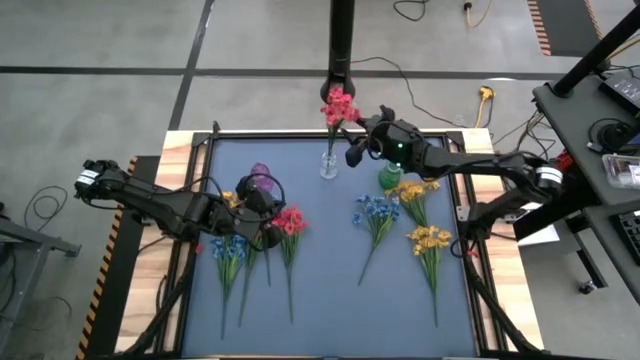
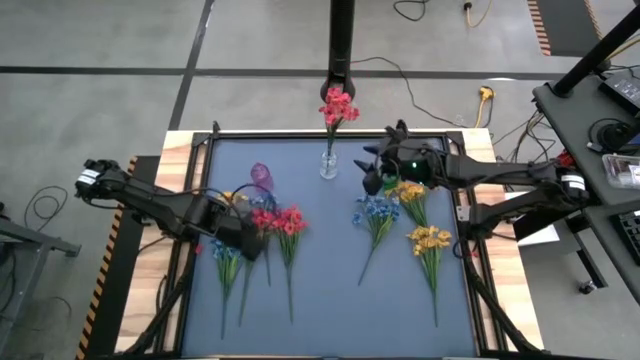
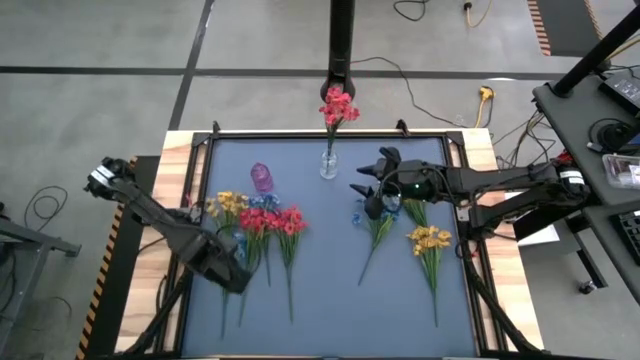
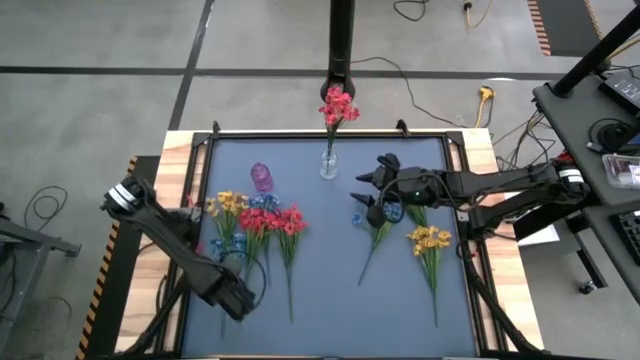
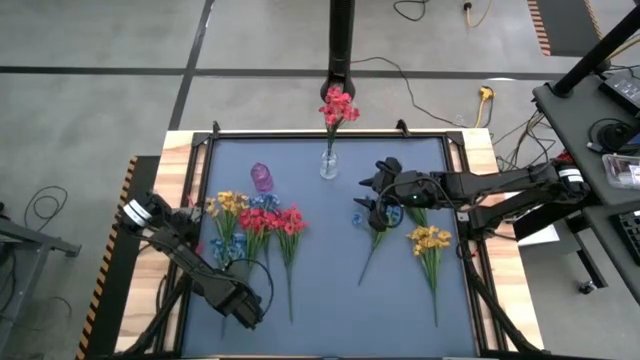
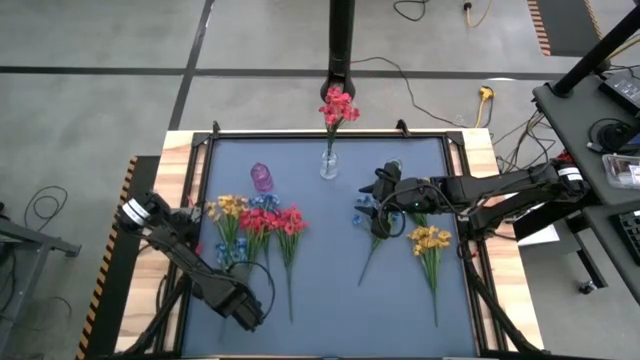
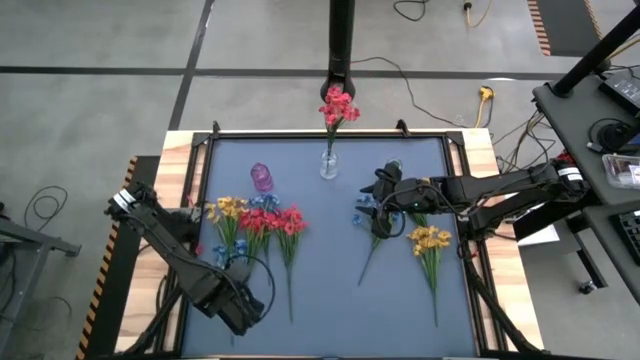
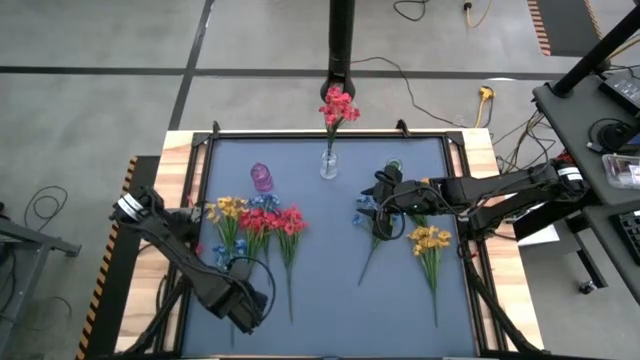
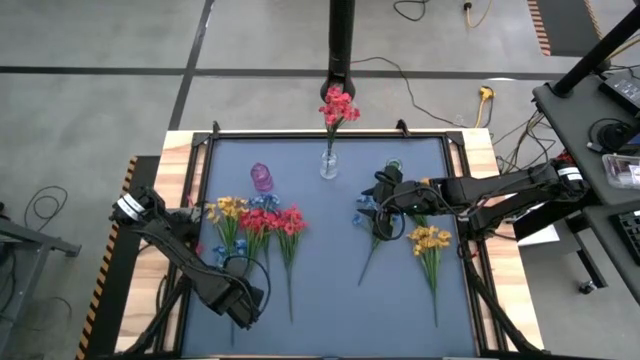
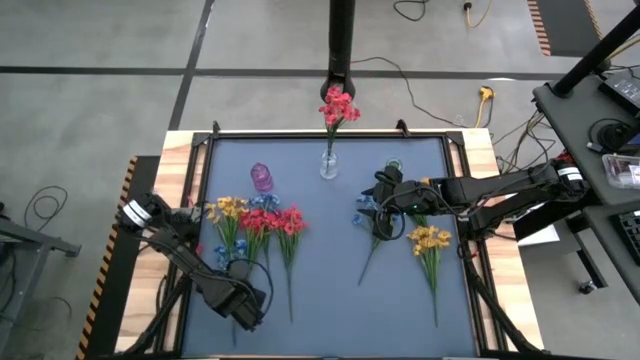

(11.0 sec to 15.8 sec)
Task: Sort flowers into vase by color
Put the left blue flower into the purple vase

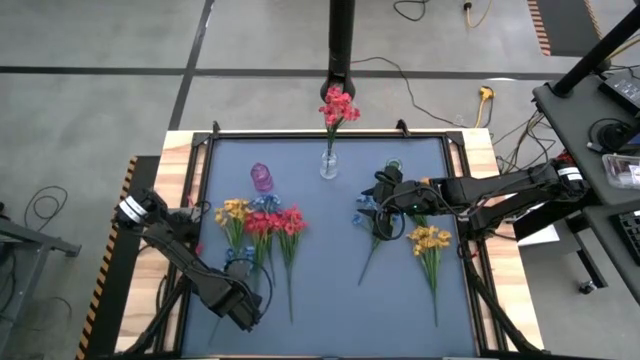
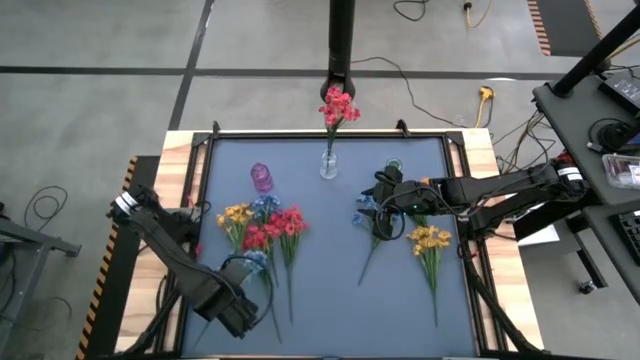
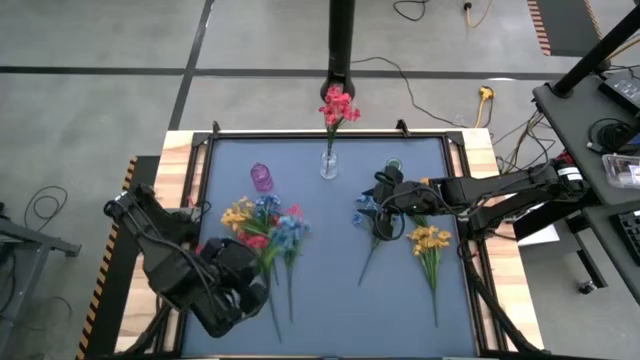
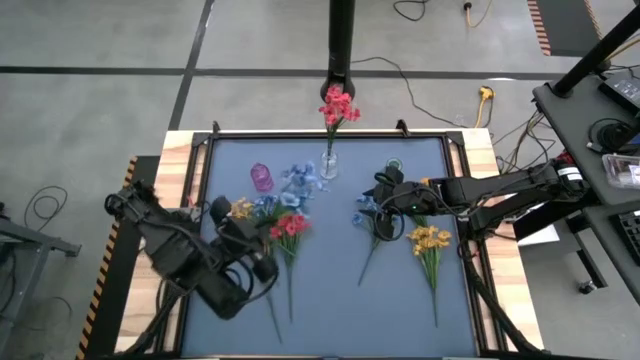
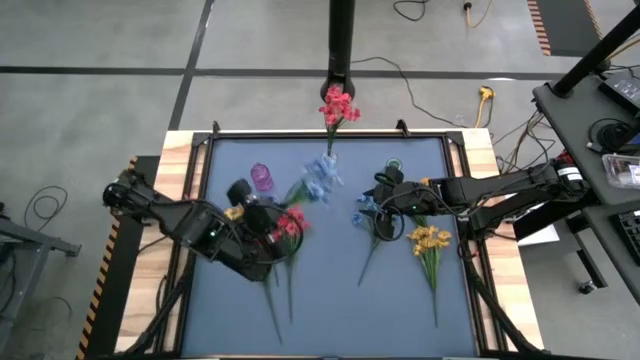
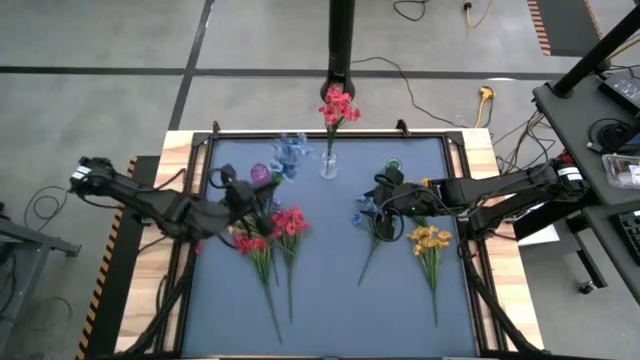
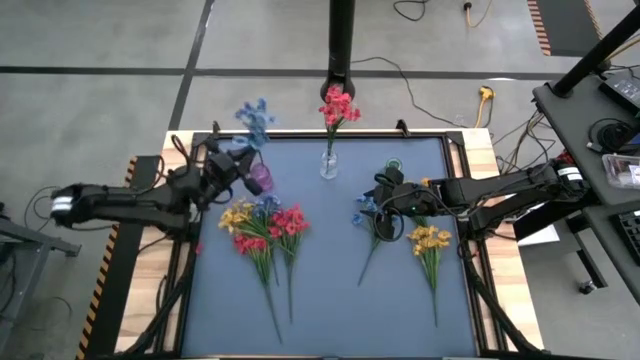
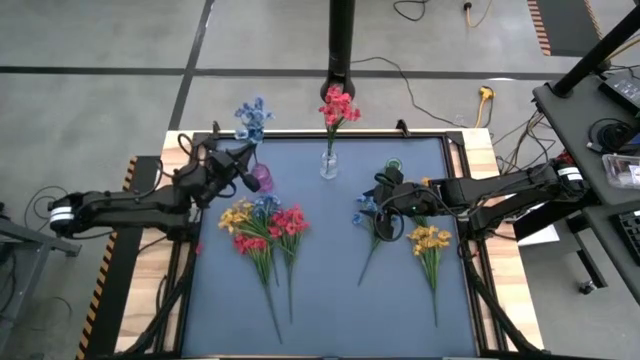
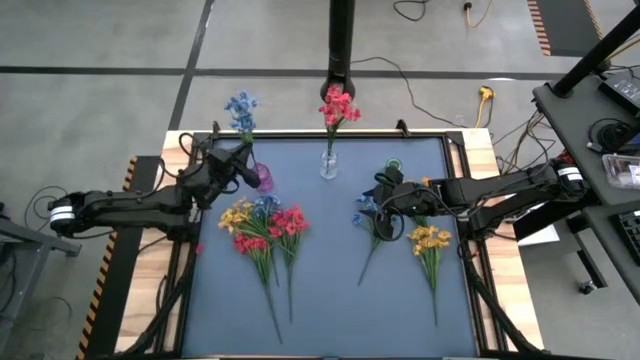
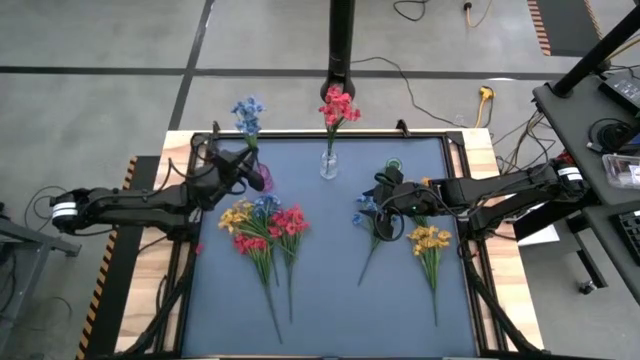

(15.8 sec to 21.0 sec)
Put the left blue flower into the purple vase

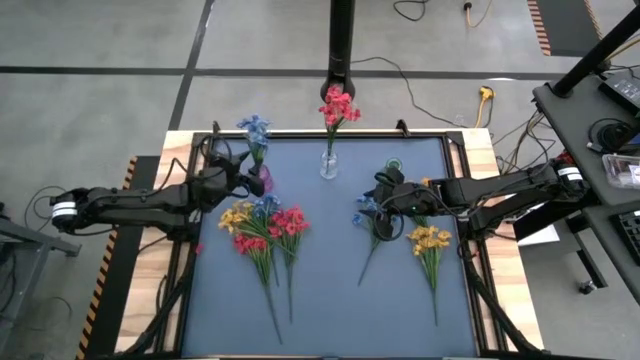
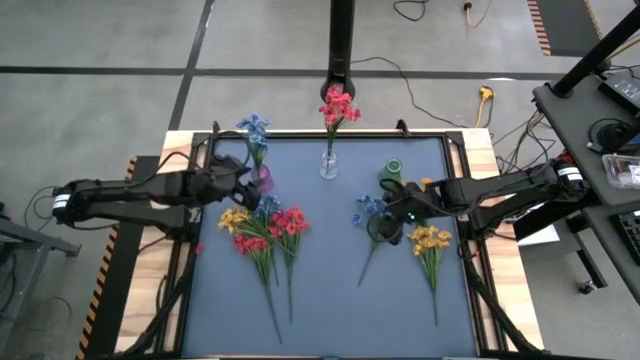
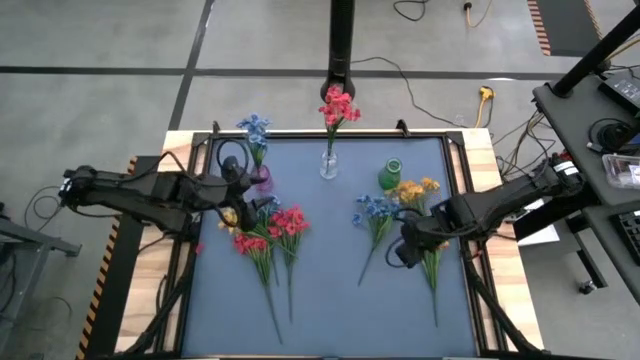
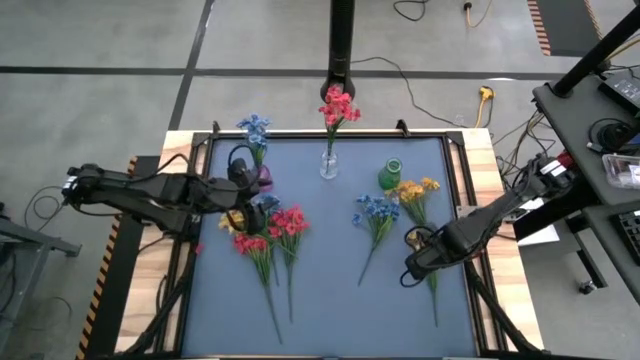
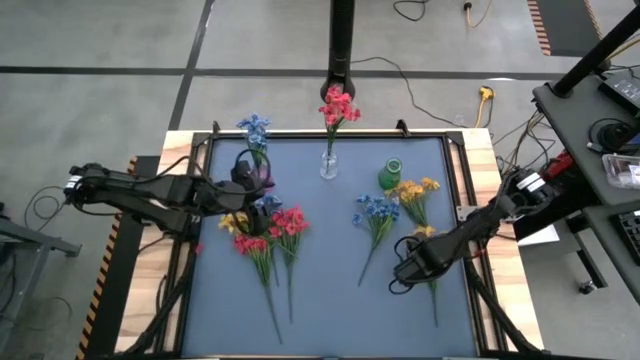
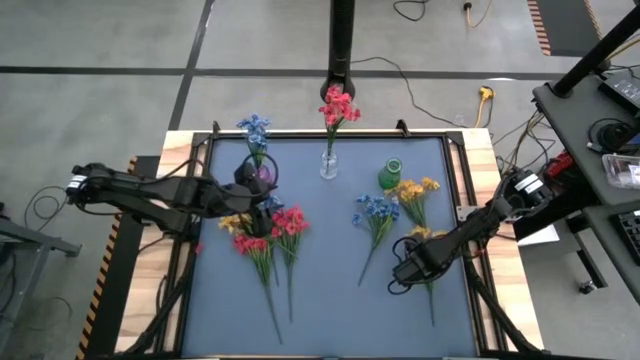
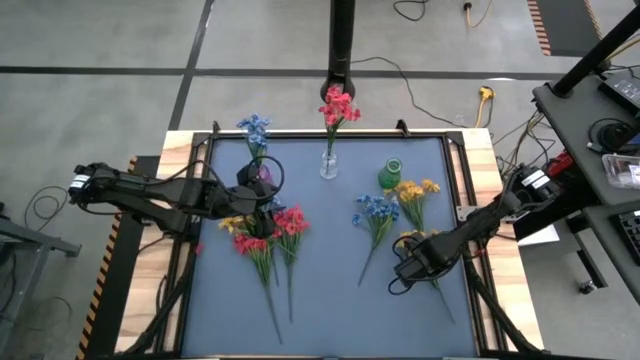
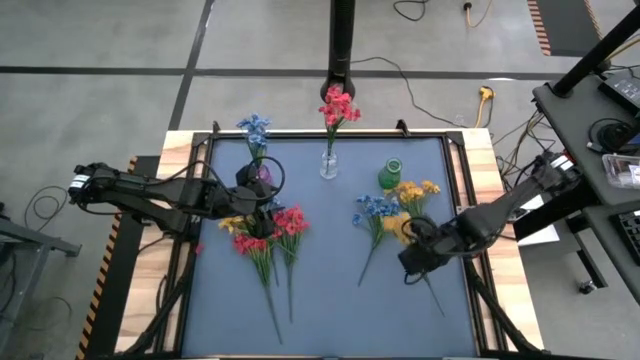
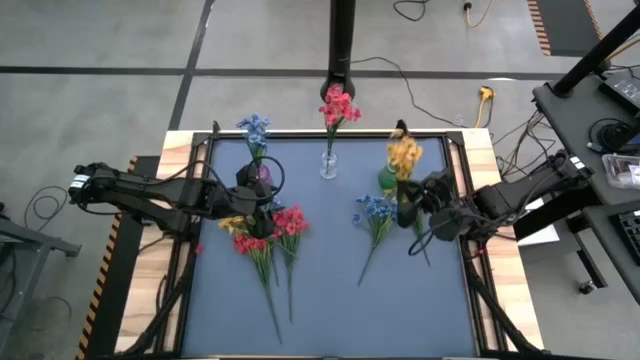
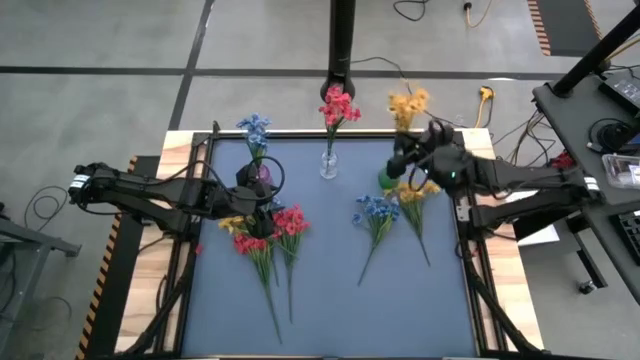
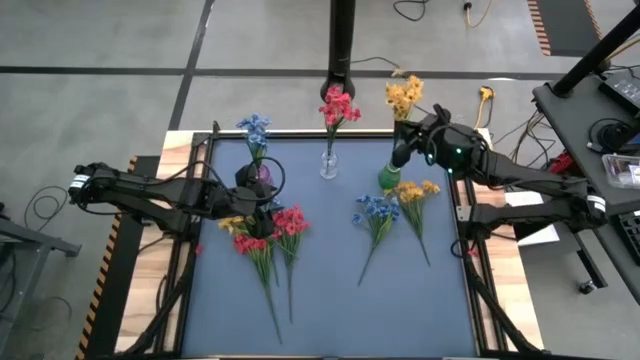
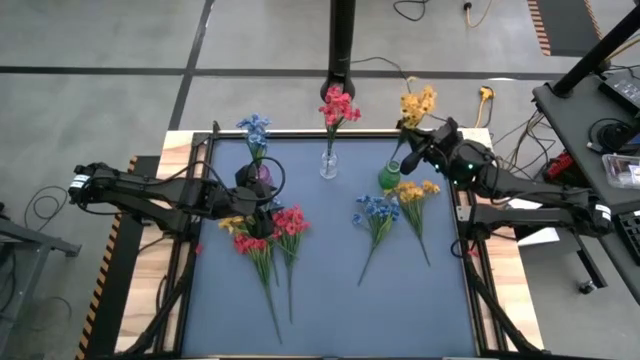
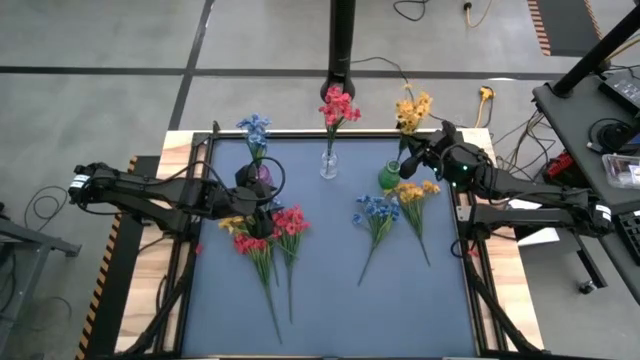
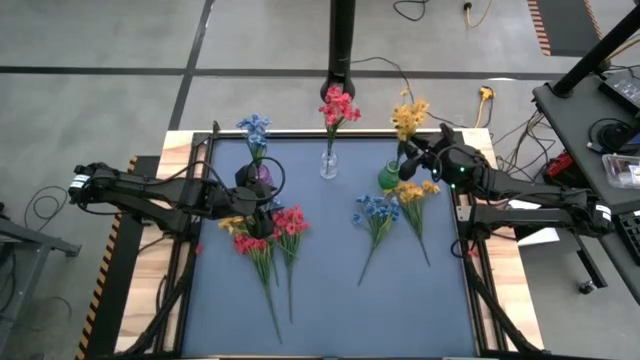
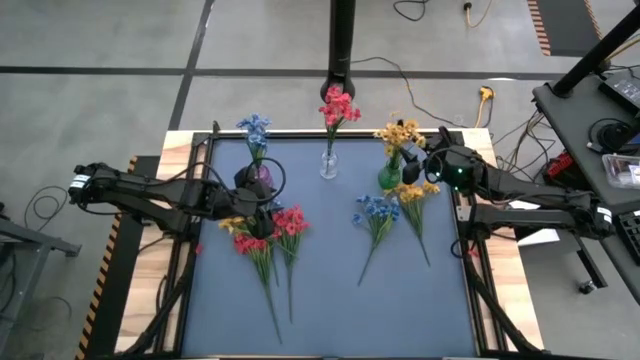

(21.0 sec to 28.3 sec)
Put the right yellow flower into the green vase

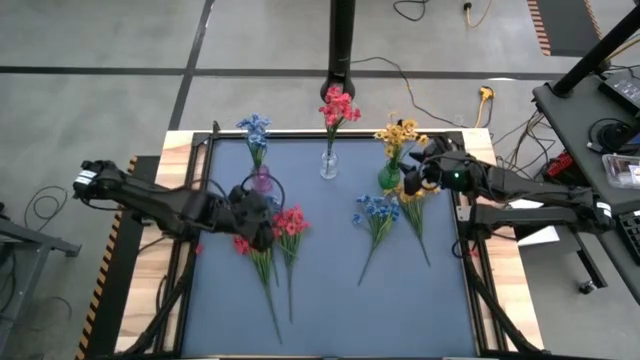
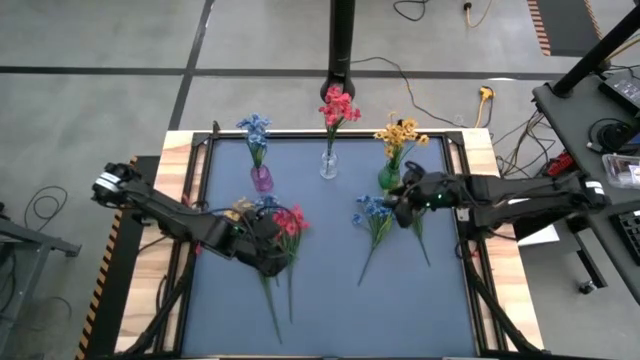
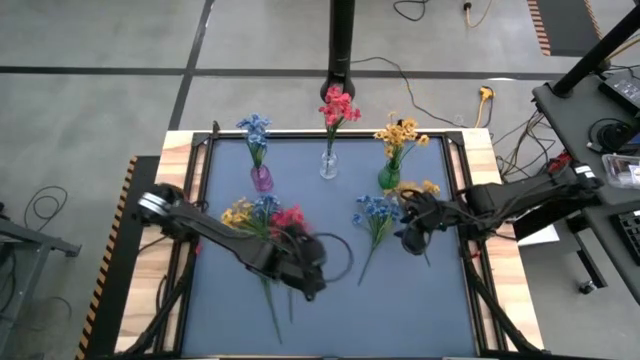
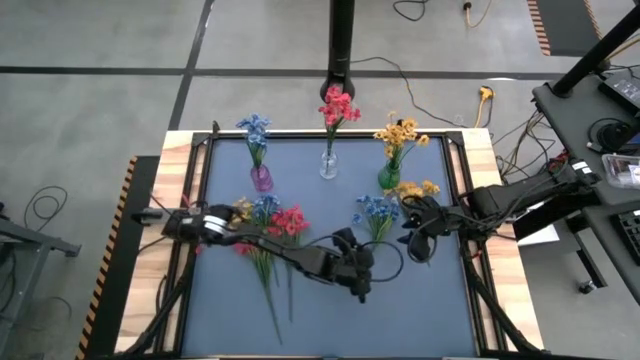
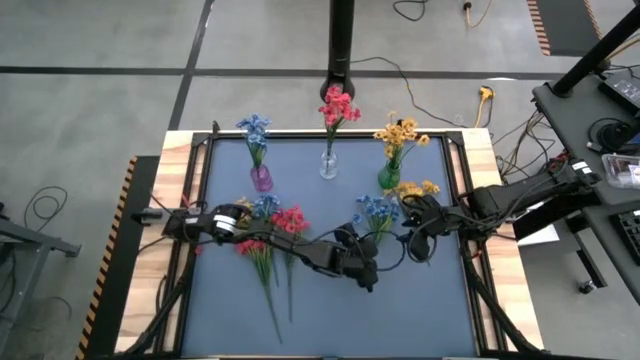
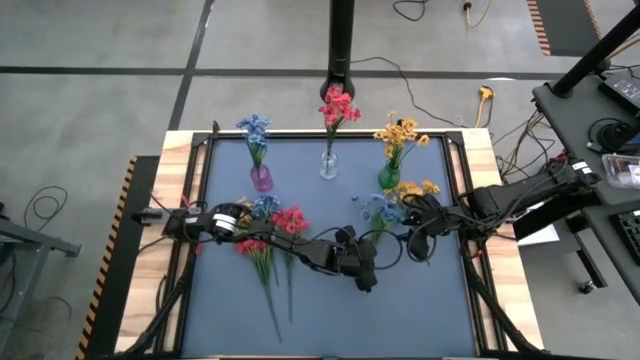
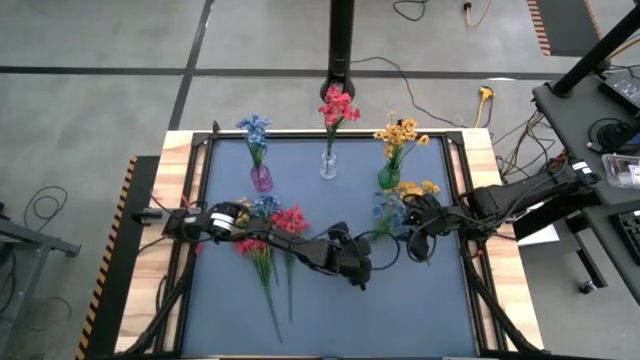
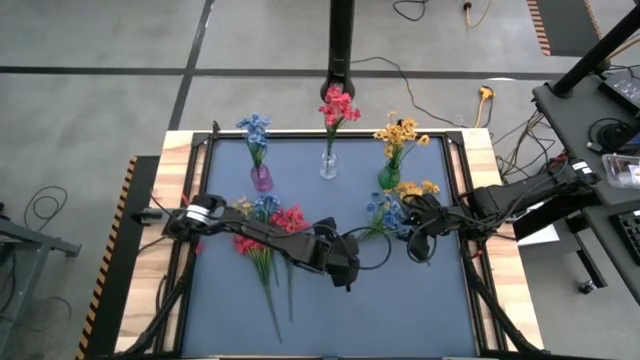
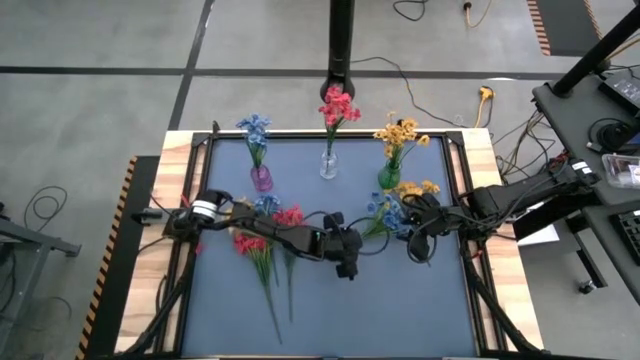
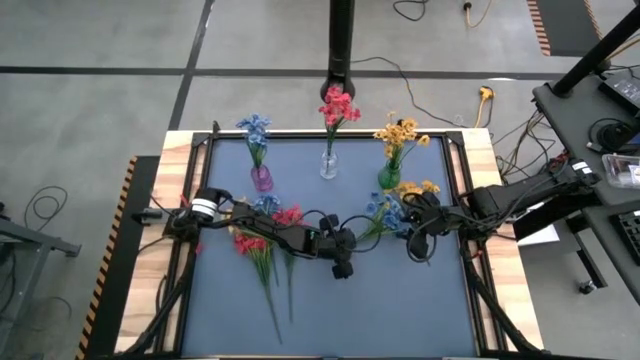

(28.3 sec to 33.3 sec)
Put the right blue flower into the purple vase
